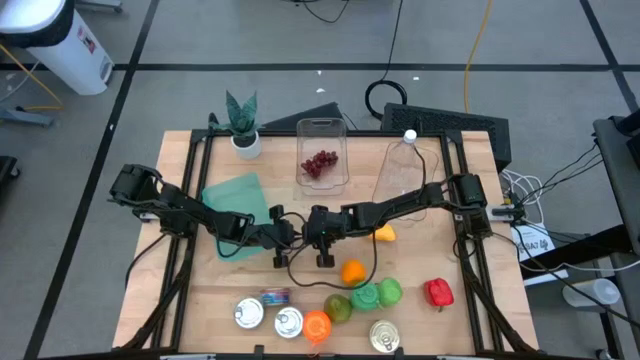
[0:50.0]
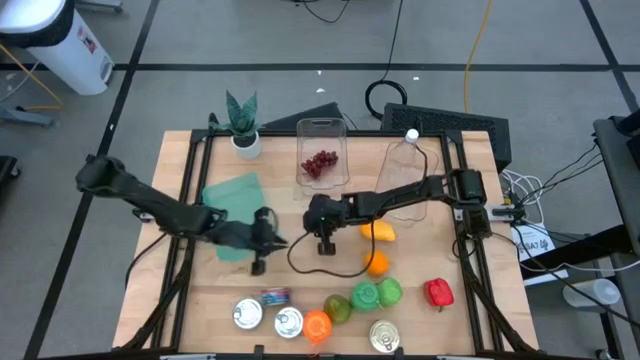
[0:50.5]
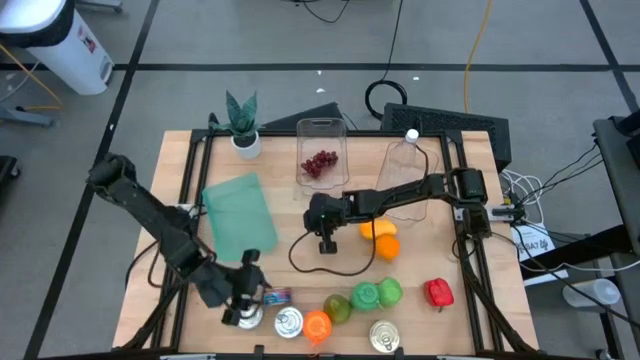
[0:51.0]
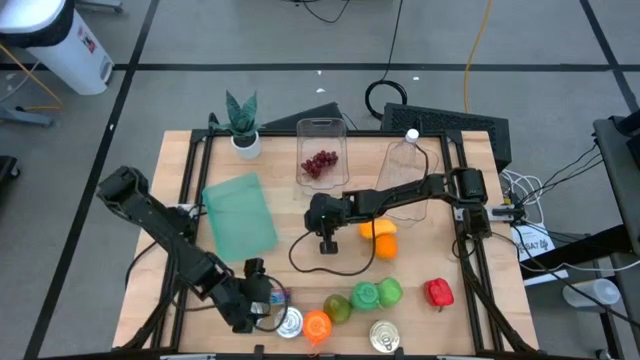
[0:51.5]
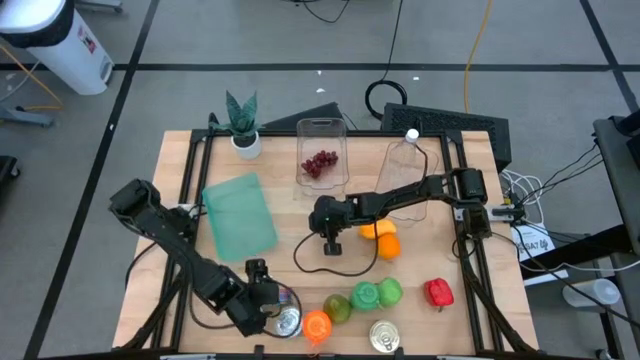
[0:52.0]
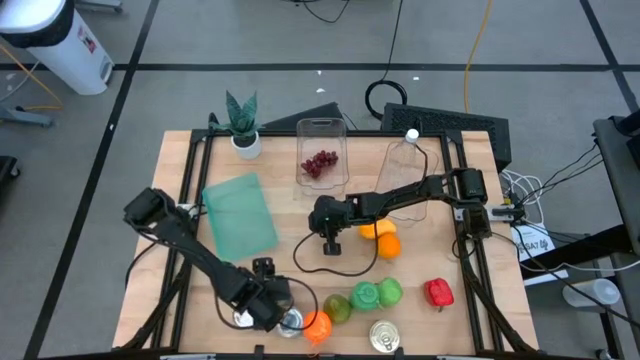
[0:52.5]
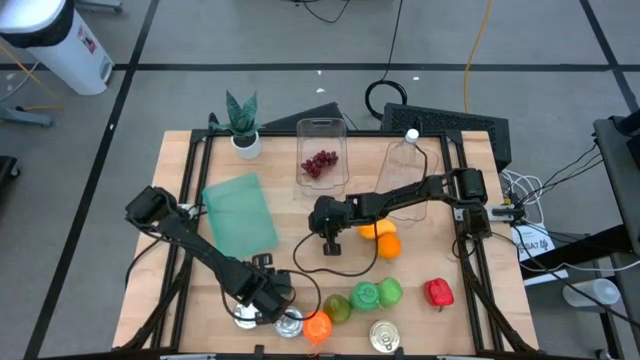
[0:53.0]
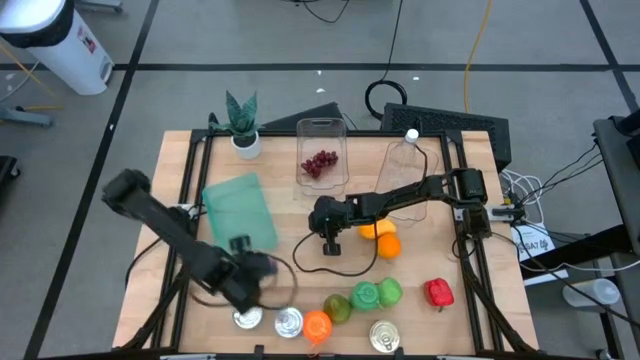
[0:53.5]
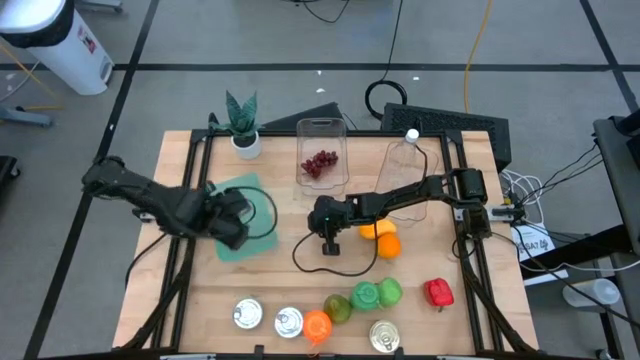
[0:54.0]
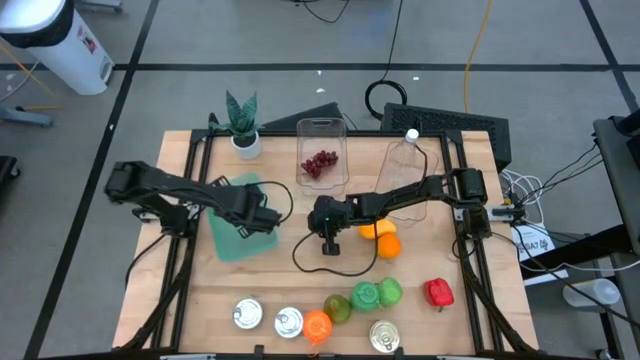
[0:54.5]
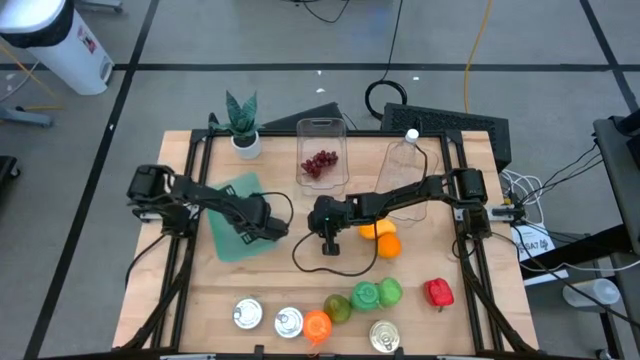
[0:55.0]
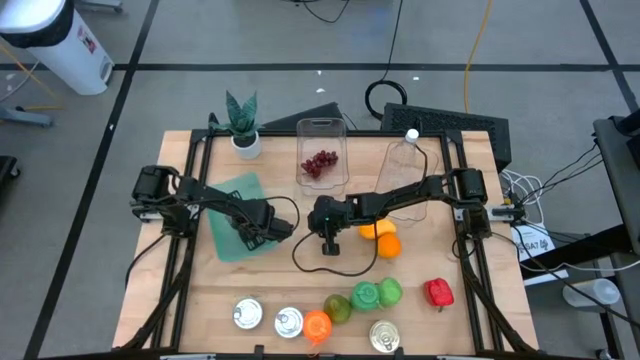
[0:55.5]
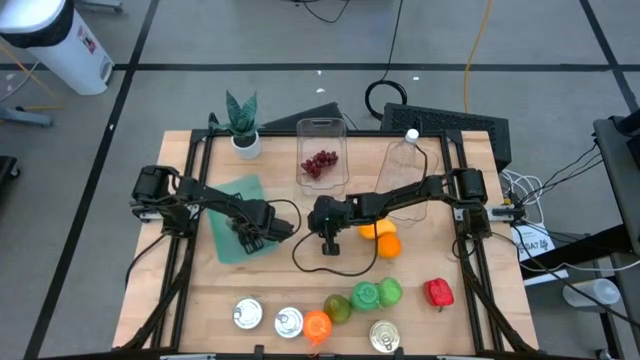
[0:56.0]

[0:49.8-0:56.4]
Task: Pick & Place Food Item
Put the blue and pink tuna can into the blue bin

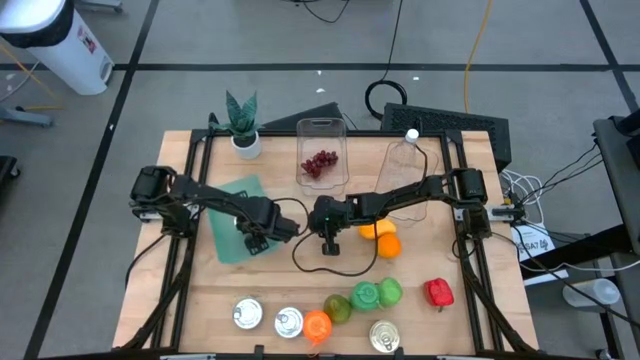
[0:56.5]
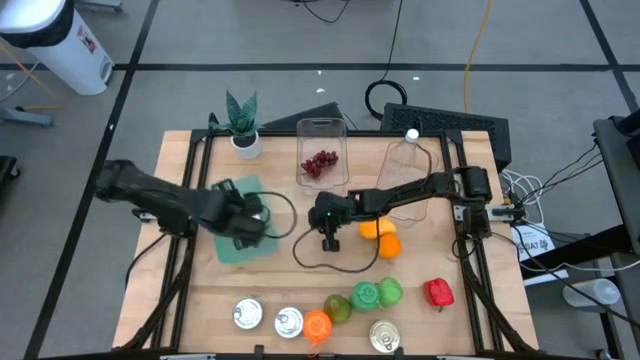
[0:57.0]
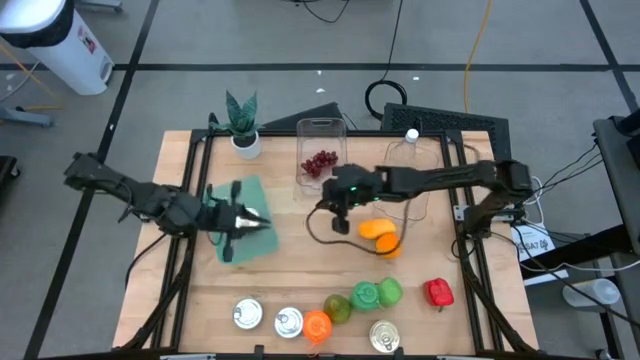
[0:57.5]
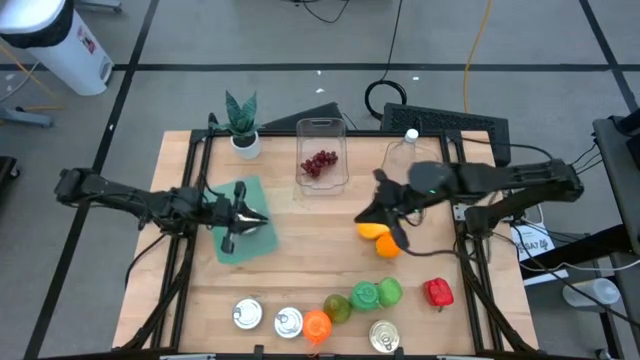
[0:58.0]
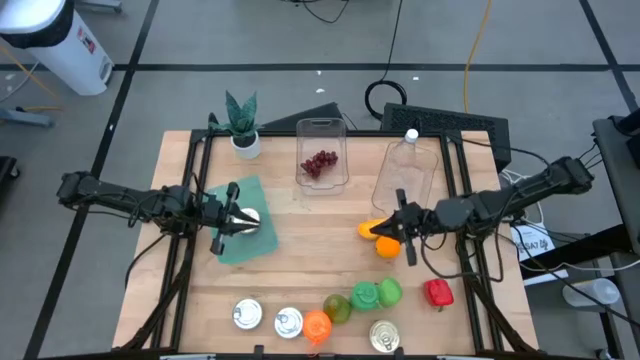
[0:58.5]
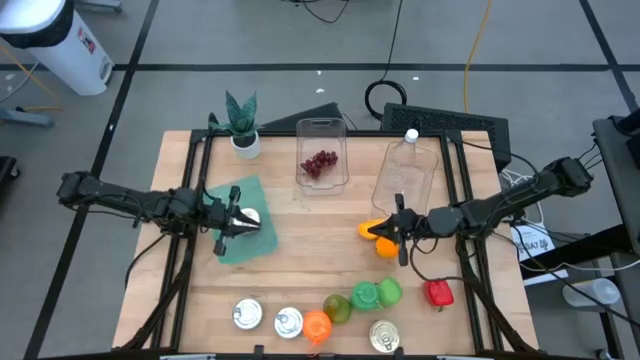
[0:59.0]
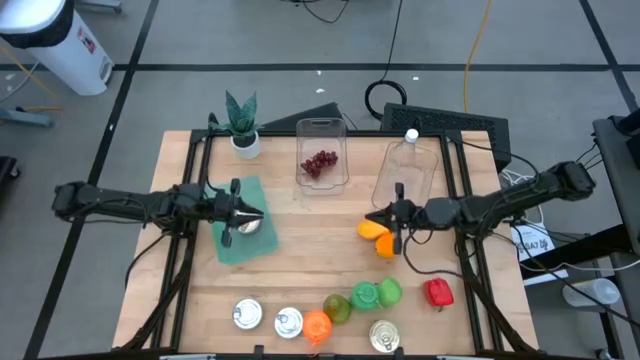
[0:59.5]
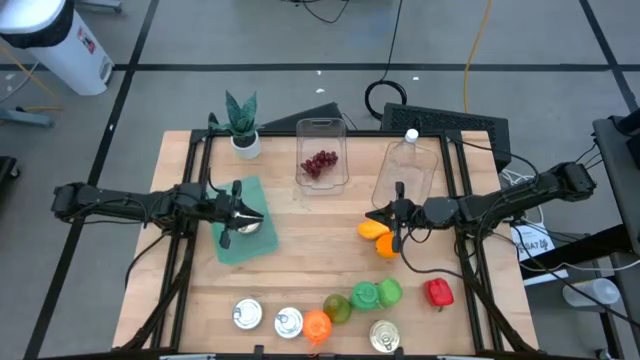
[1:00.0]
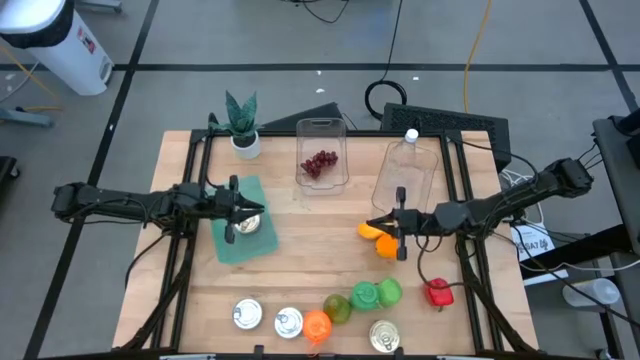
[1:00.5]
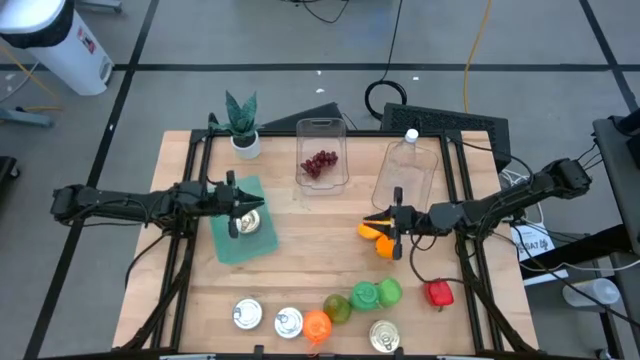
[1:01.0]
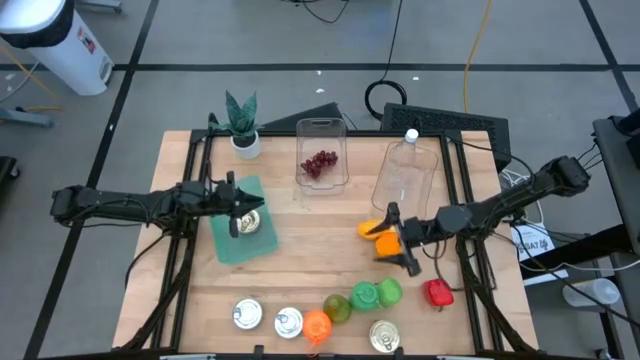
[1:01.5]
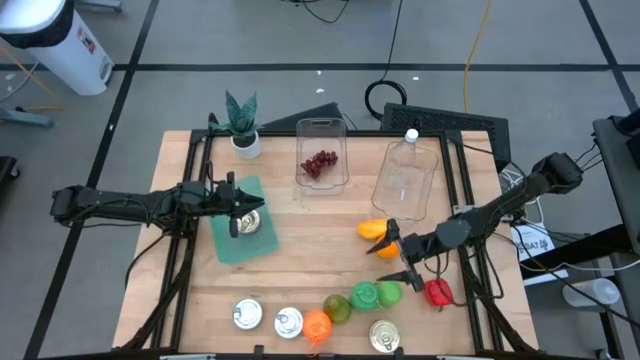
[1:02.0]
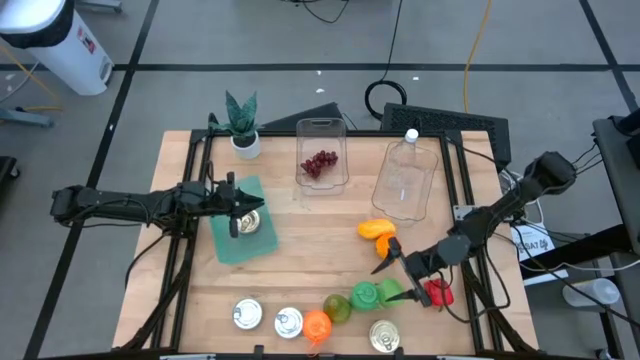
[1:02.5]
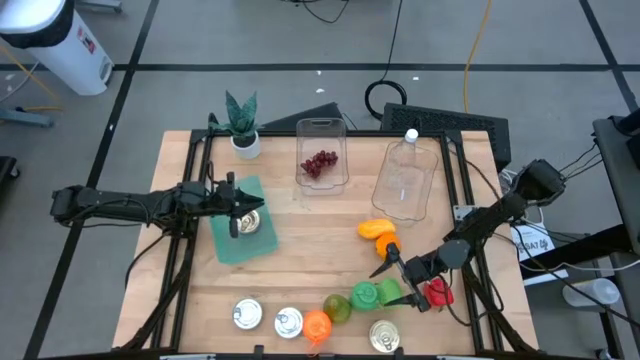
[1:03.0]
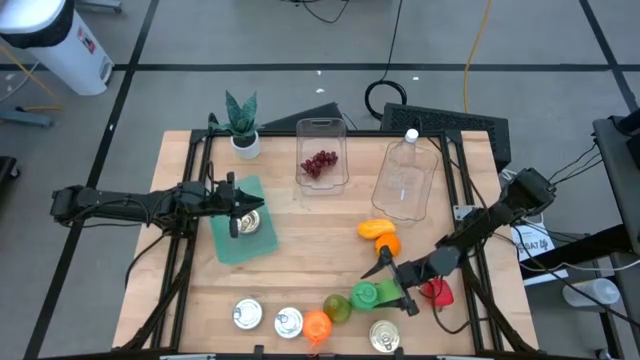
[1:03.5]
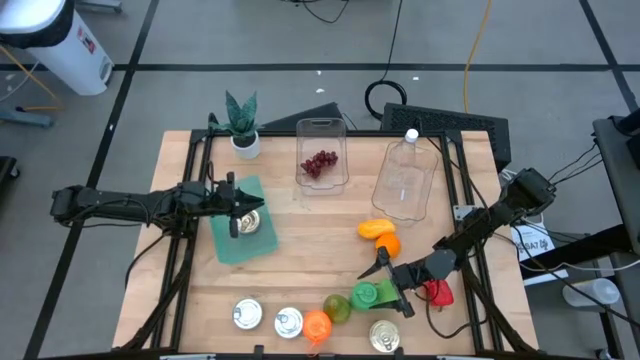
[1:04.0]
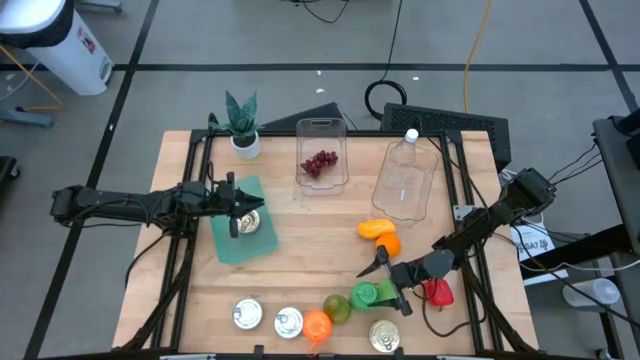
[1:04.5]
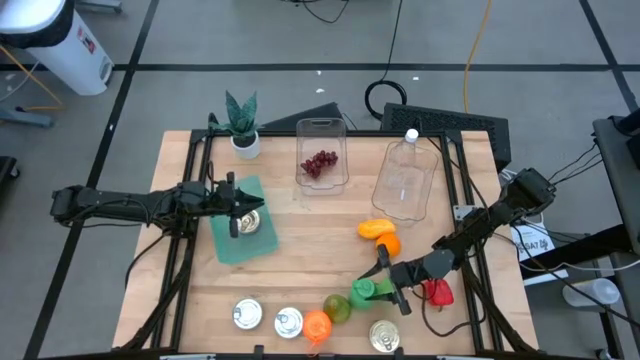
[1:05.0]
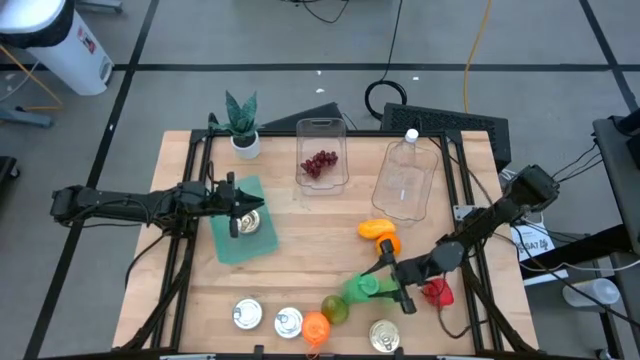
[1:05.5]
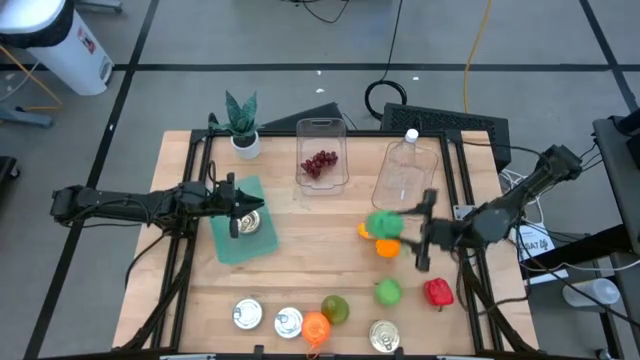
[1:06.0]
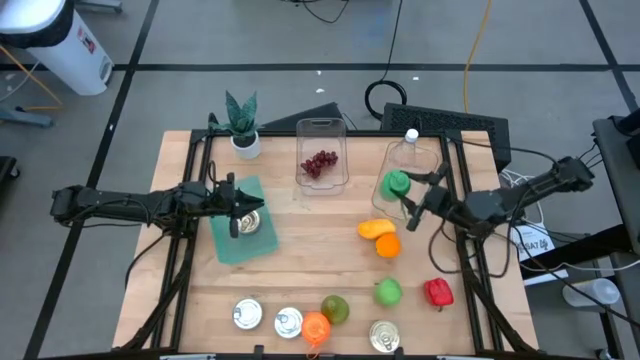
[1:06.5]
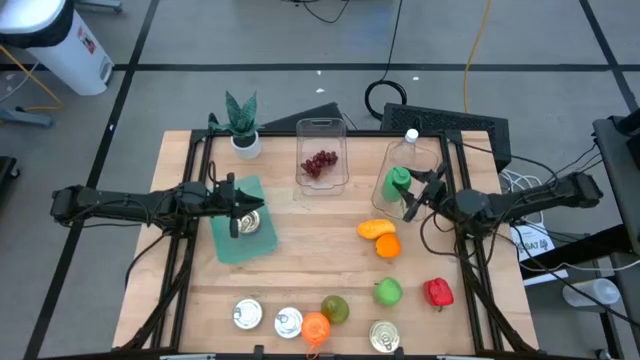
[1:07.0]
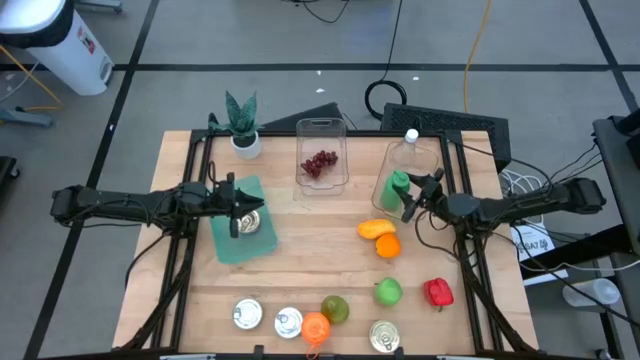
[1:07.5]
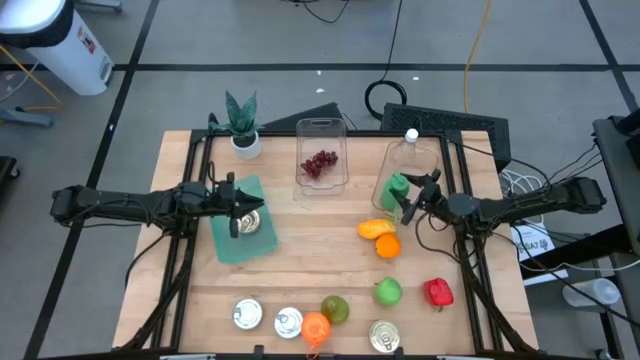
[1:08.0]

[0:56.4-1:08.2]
Put the green water bottle into the right transparent bin

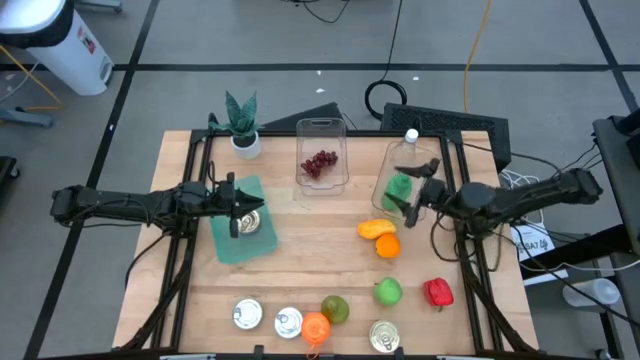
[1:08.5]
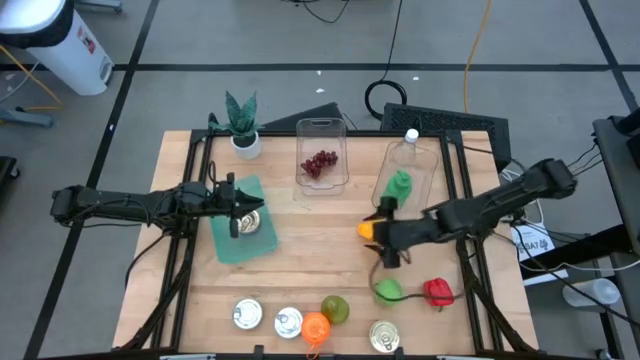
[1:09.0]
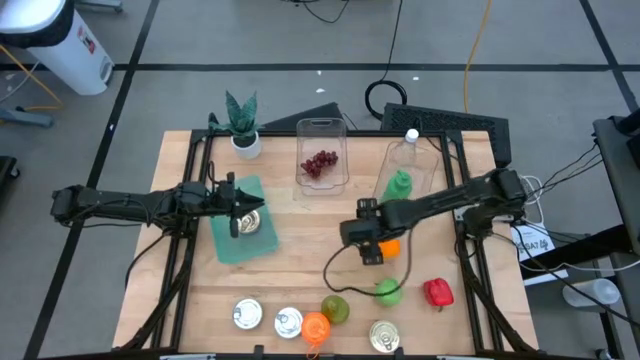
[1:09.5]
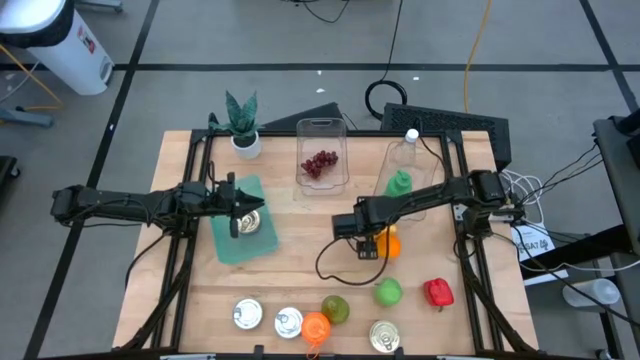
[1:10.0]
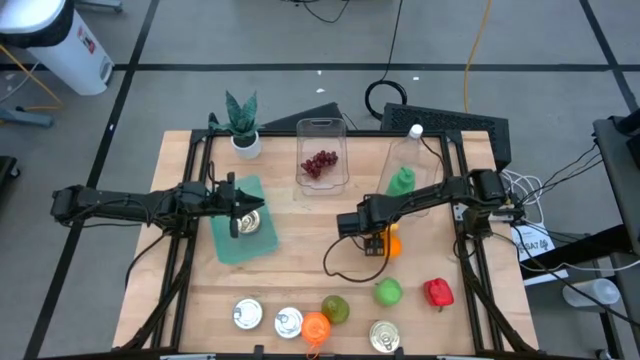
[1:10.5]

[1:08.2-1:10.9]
Put the mango into the left transparent bin
